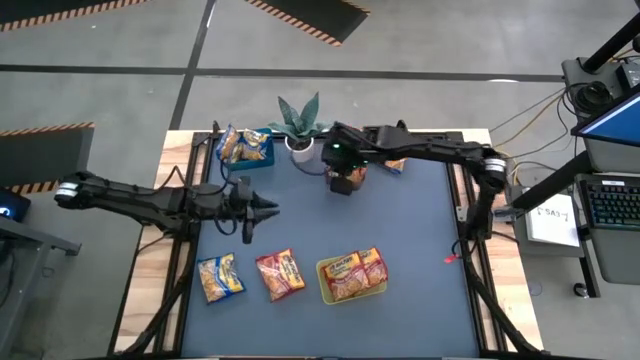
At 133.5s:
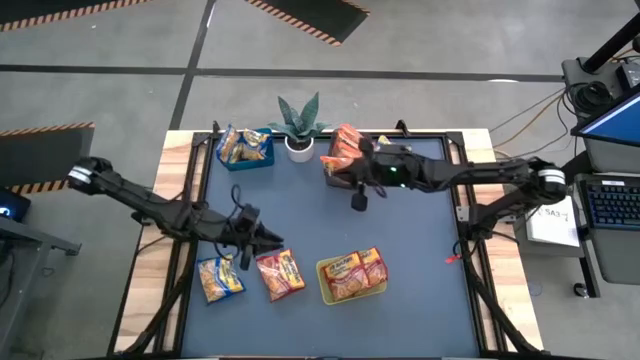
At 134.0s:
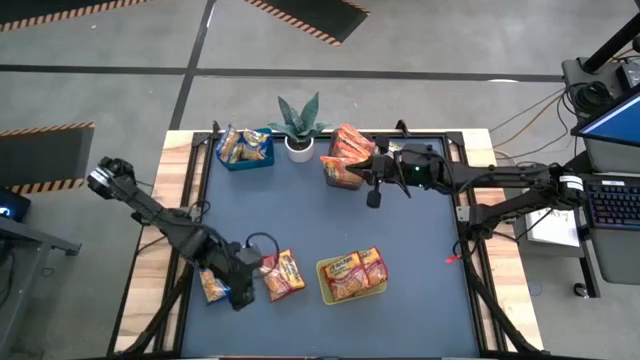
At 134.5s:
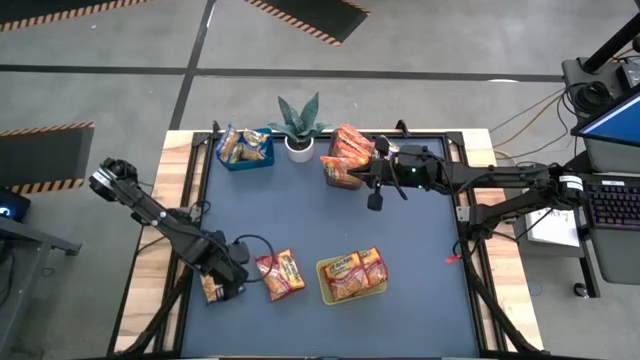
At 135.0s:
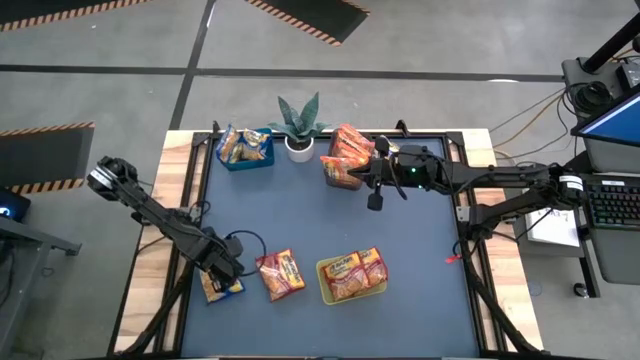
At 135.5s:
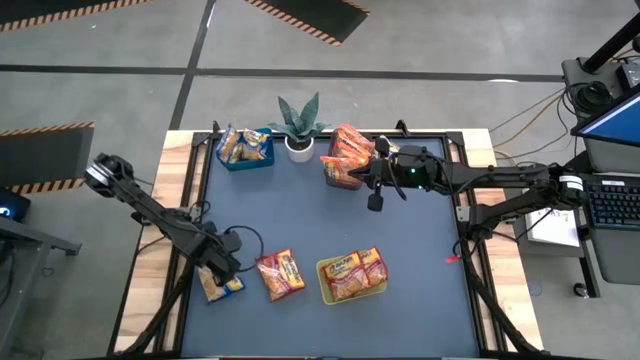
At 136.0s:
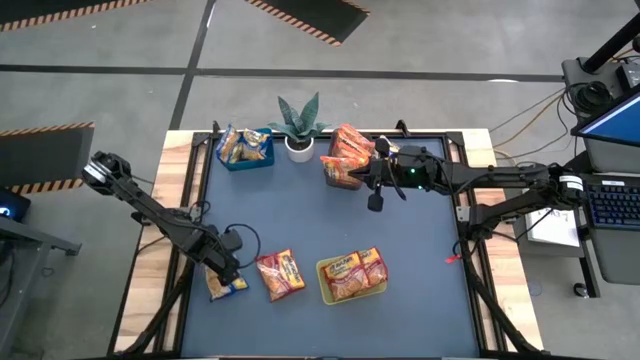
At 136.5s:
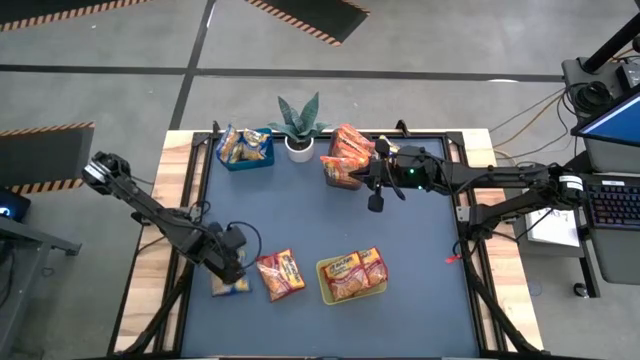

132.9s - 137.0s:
Task: Sort Maruchan noodles
Put the blue bag into the blue bin

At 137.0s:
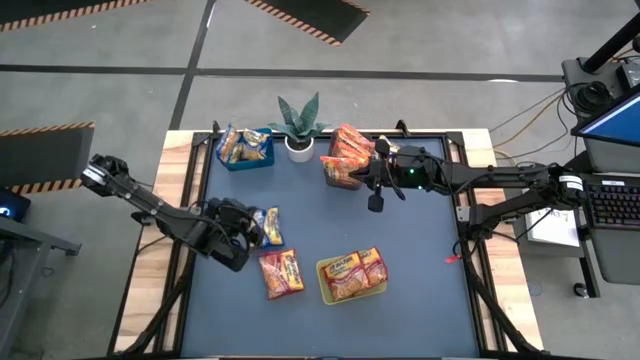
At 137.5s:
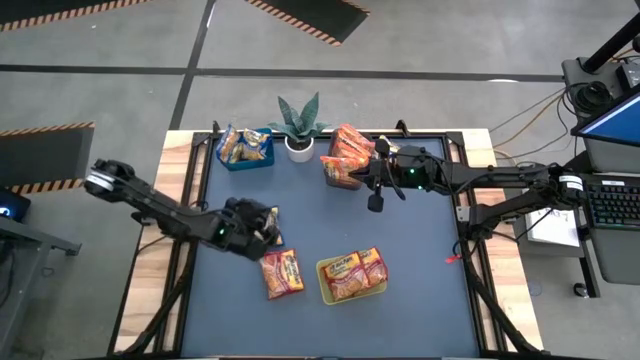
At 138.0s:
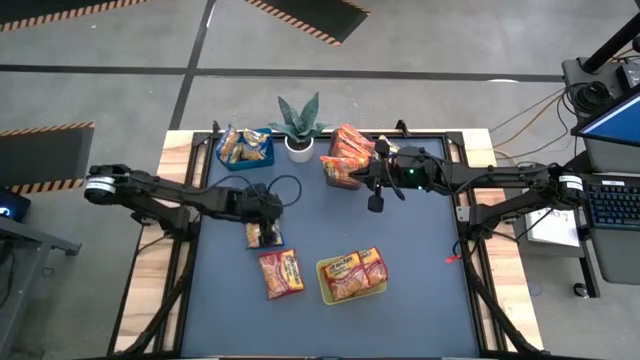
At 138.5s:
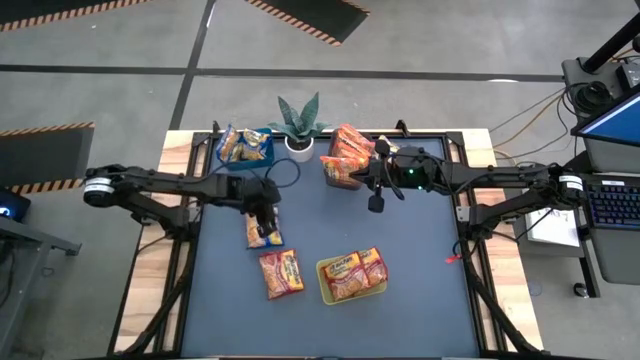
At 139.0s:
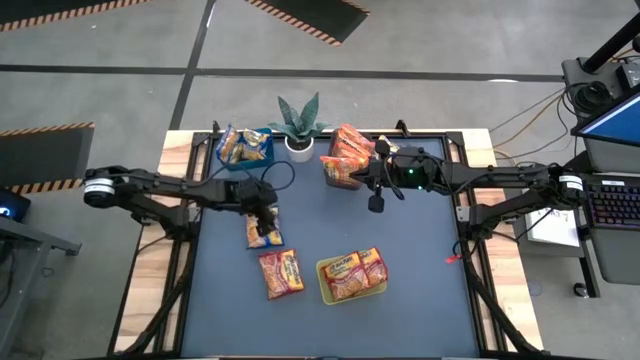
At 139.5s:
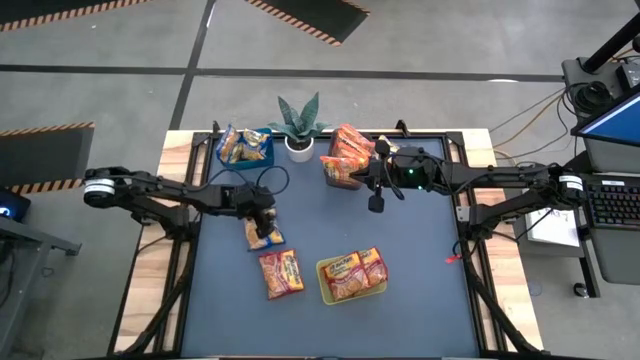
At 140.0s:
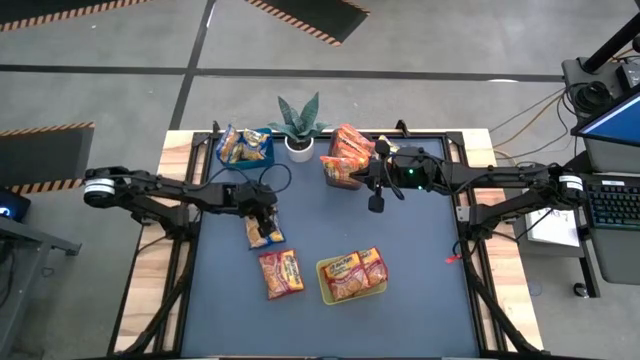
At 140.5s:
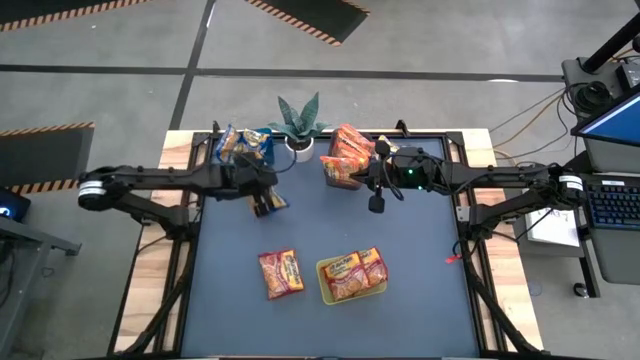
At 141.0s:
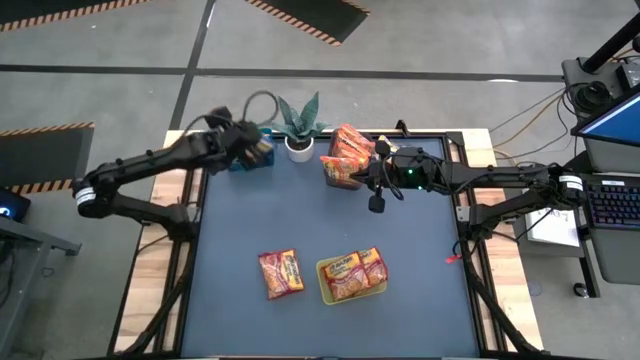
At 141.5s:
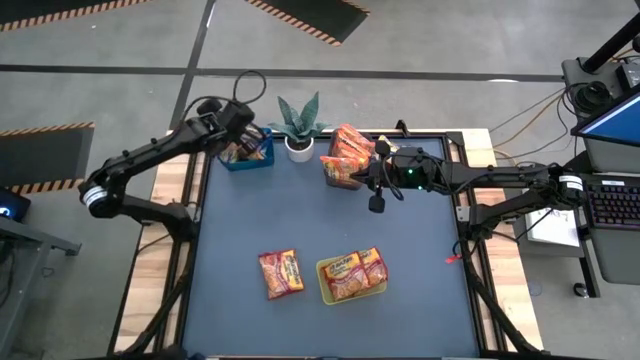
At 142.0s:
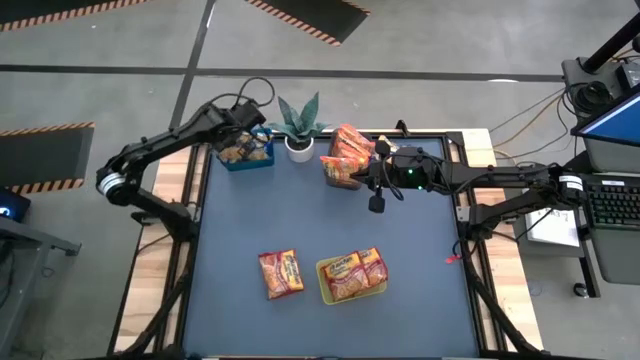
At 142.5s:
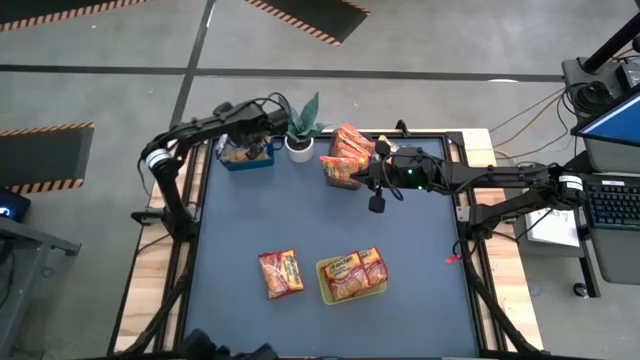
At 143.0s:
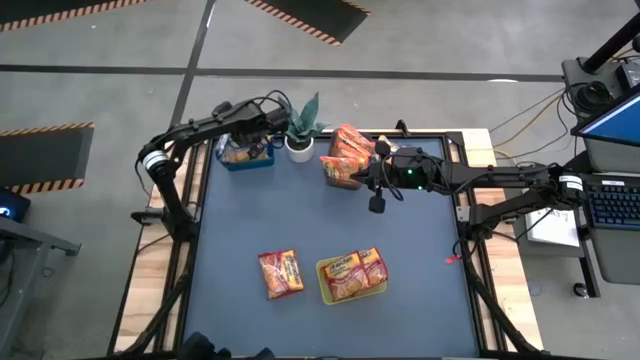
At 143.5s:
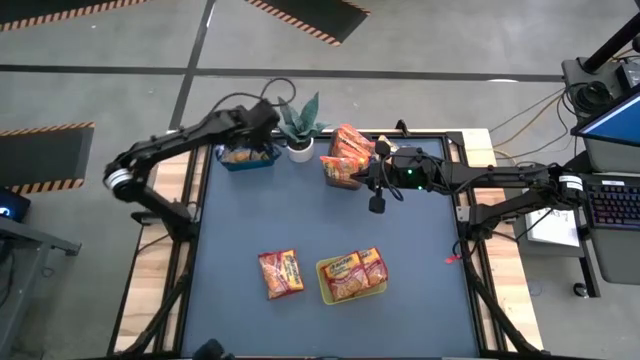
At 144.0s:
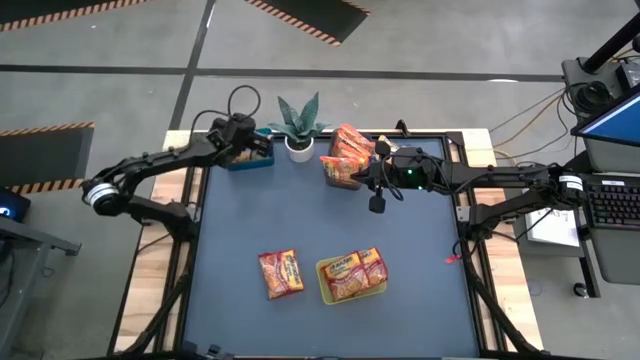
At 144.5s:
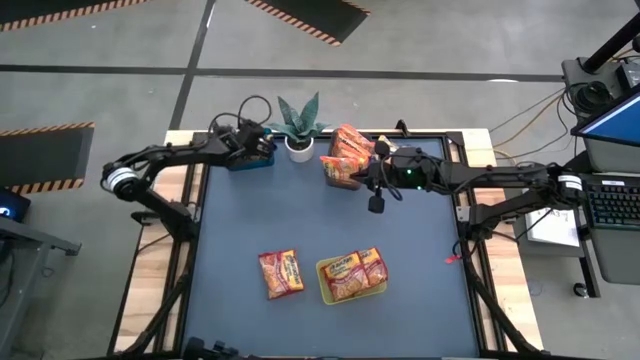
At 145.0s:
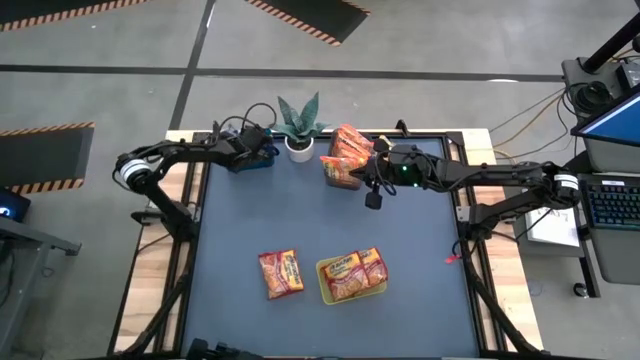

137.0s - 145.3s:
Put the blue bag into the blue bin

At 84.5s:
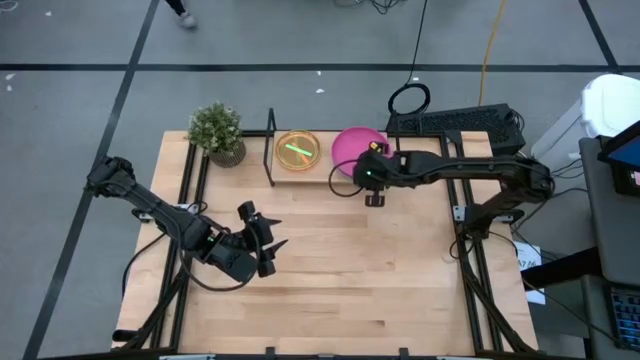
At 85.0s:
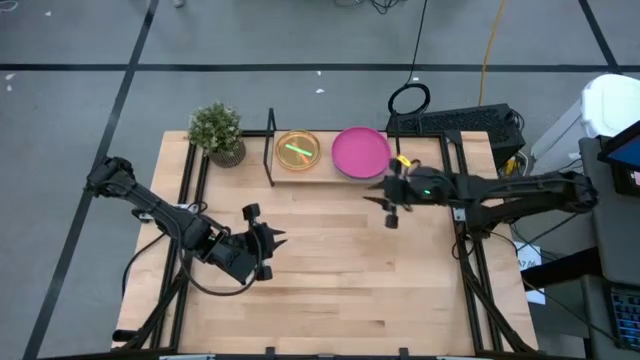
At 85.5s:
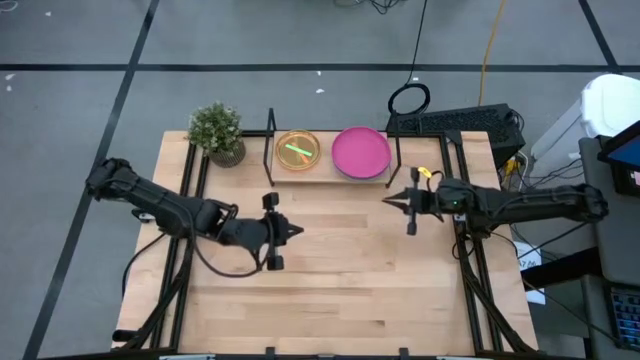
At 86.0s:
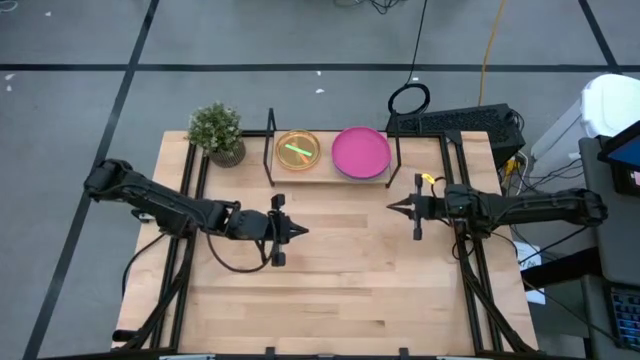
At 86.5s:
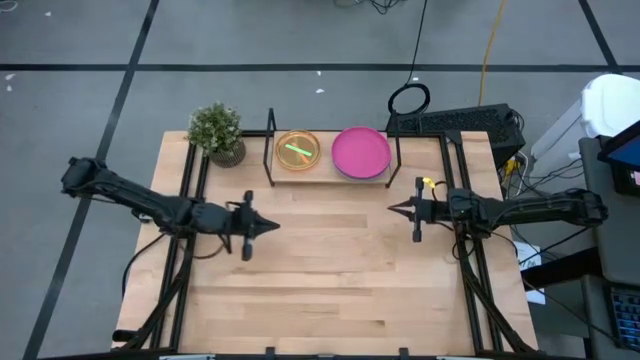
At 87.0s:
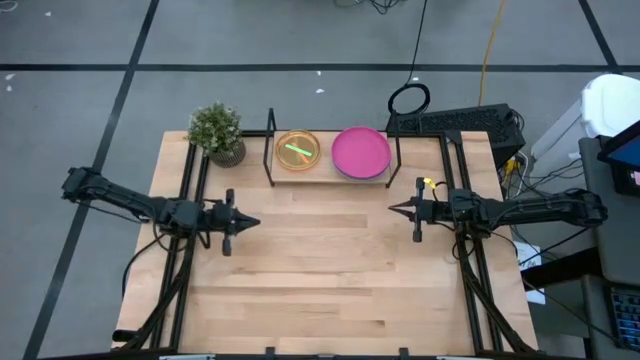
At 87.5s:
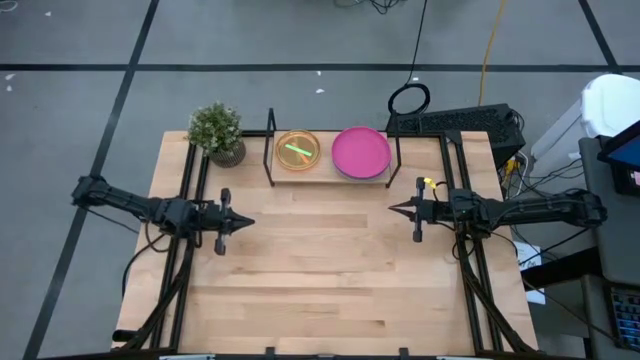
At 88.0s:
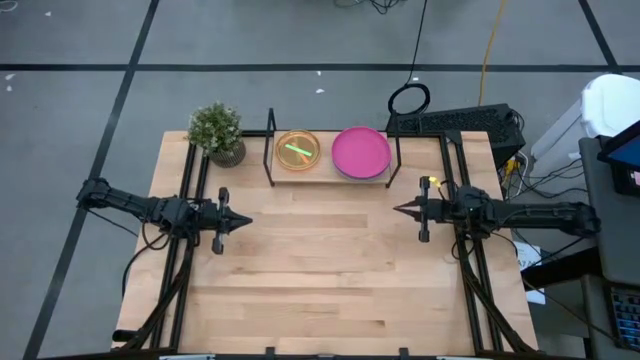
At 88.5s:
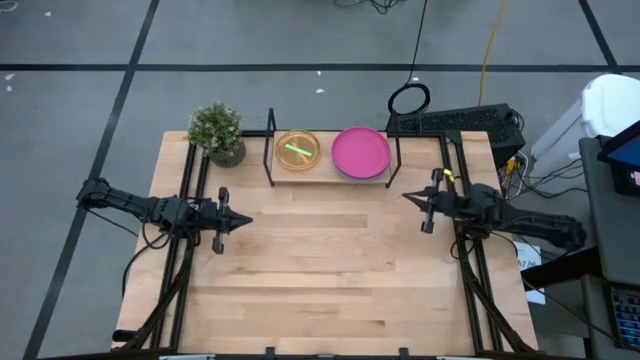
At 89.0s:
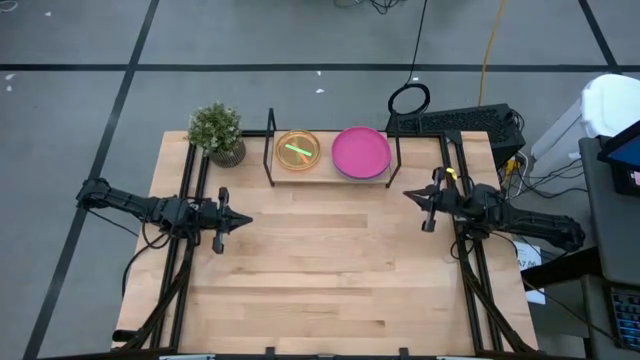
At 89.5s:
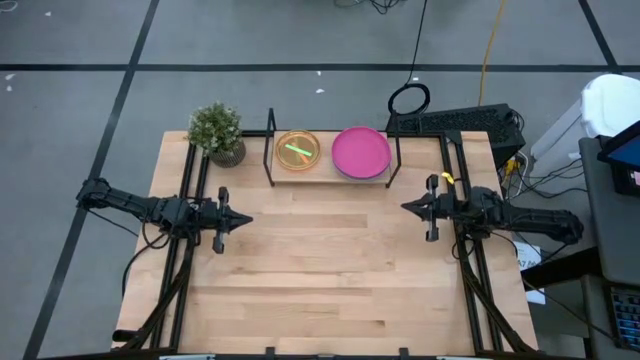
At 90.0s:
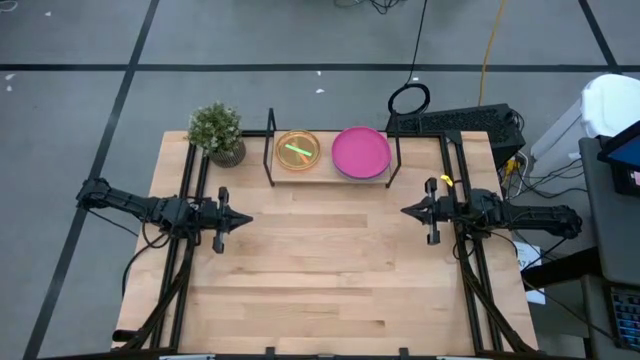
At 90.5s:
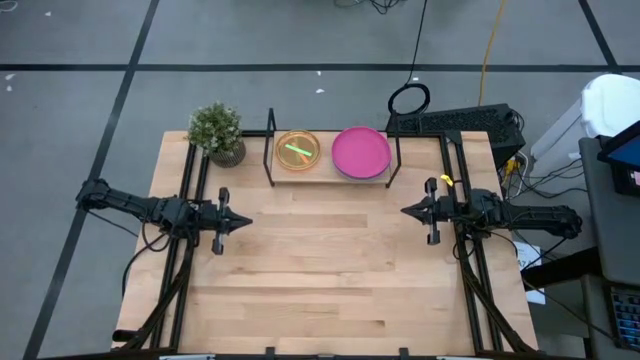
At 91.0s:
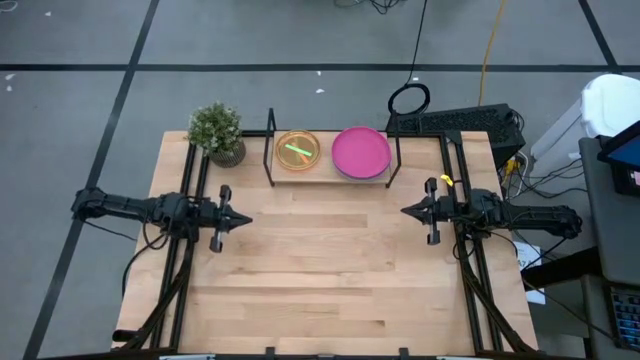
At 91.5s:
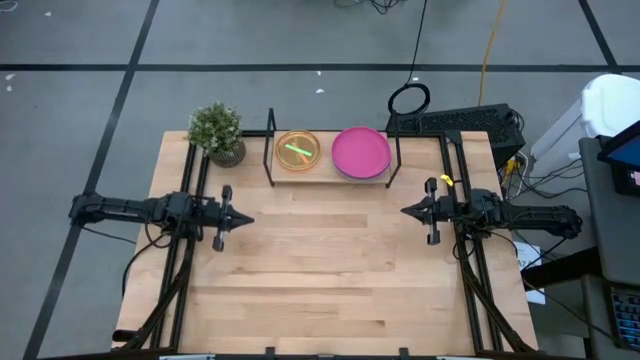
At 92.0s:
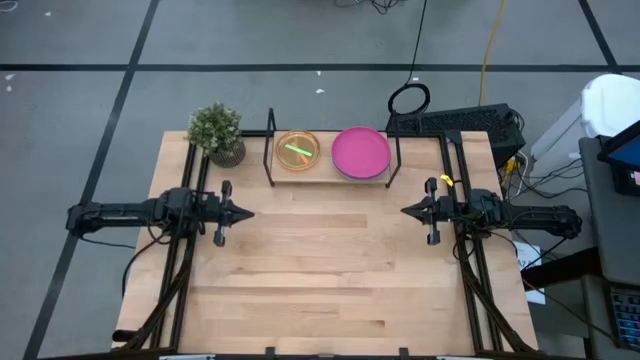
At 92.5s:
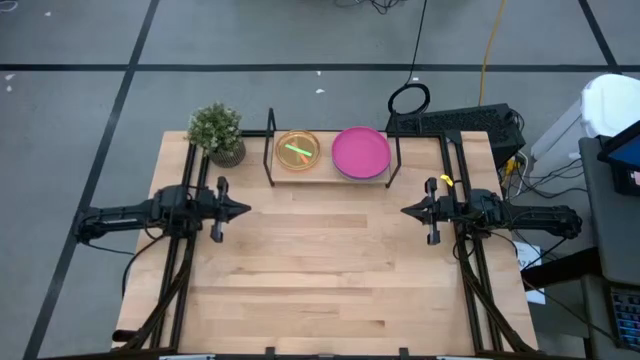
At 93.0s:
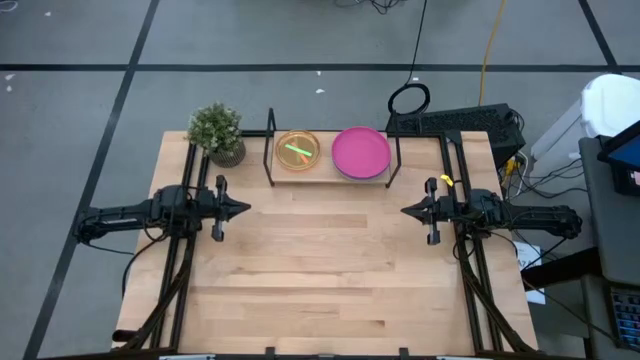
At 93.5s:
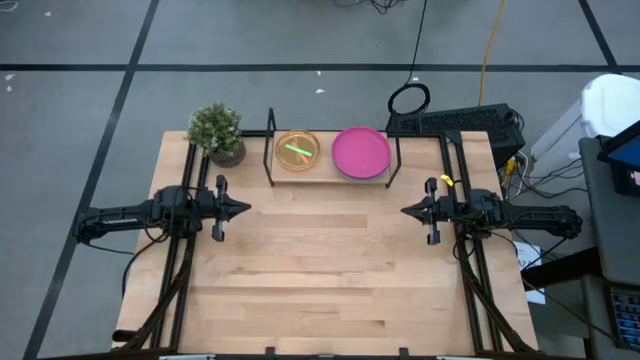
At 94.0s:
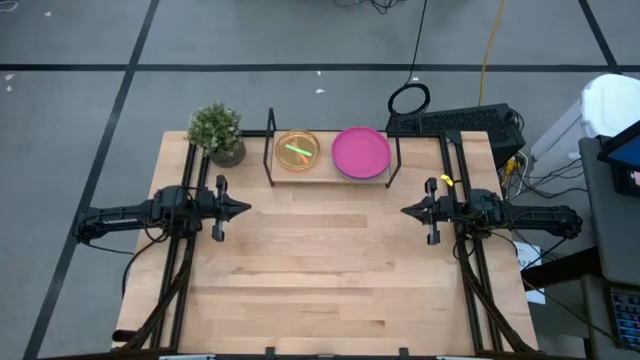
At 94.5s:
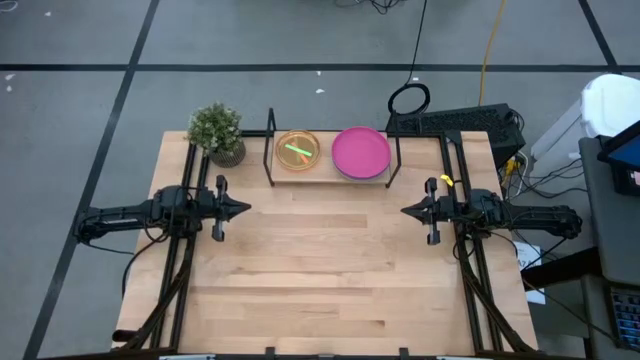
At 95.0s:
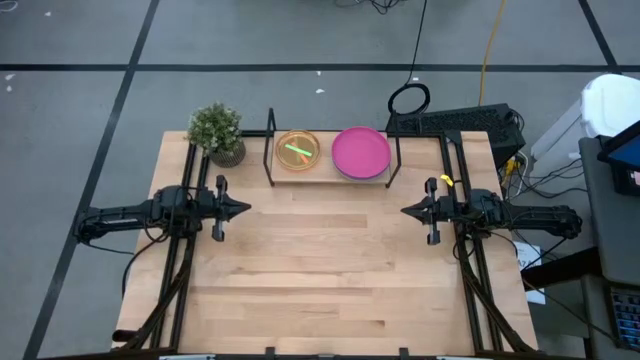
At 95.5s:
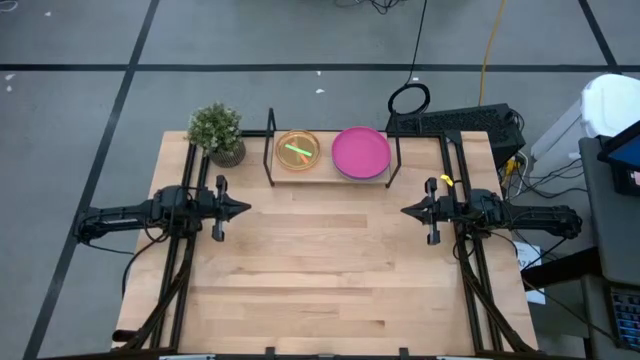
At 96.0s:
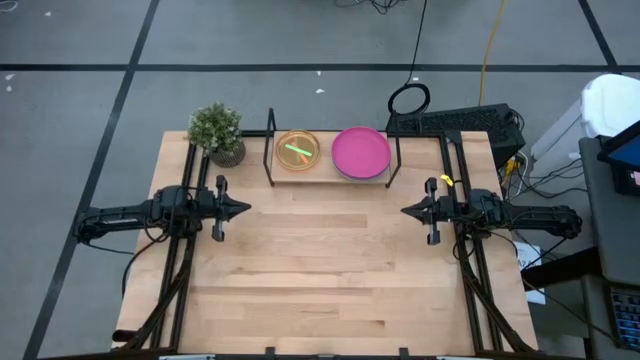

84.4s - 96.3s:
Task: Place and stack plates onto a shelf
Return to Home Position
